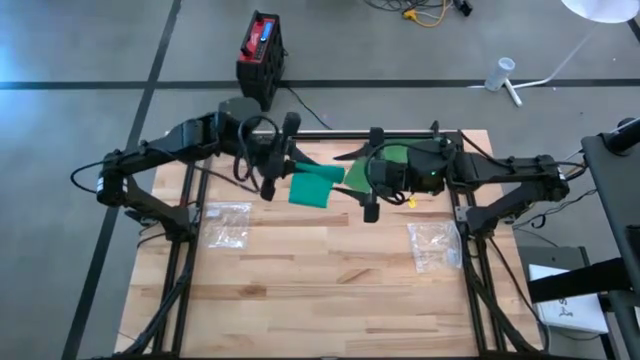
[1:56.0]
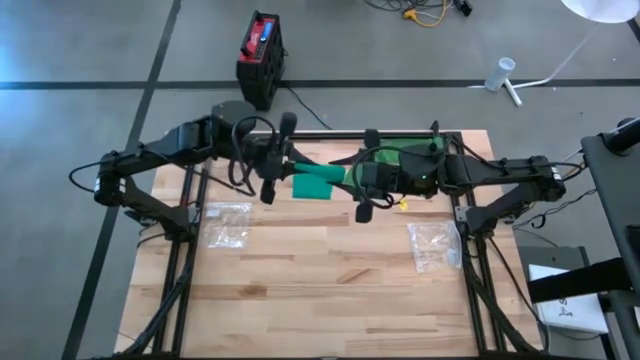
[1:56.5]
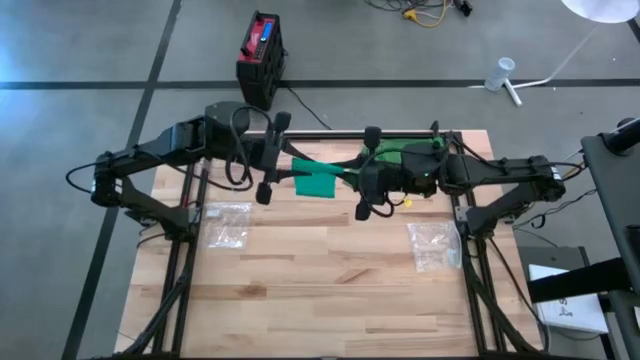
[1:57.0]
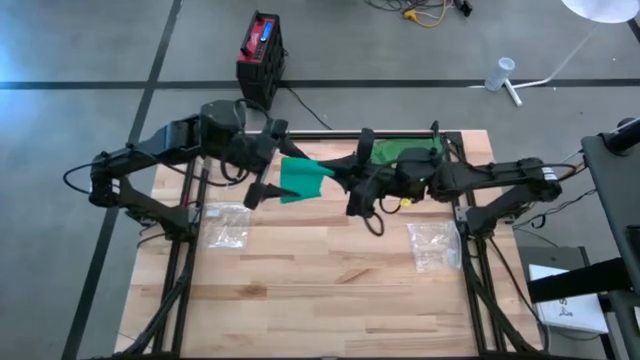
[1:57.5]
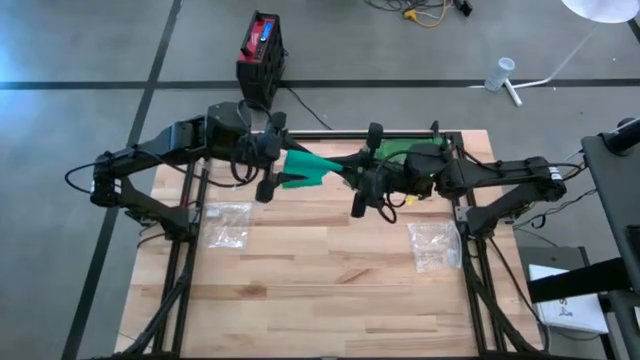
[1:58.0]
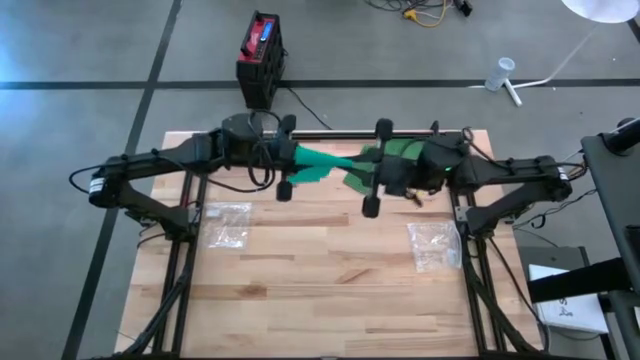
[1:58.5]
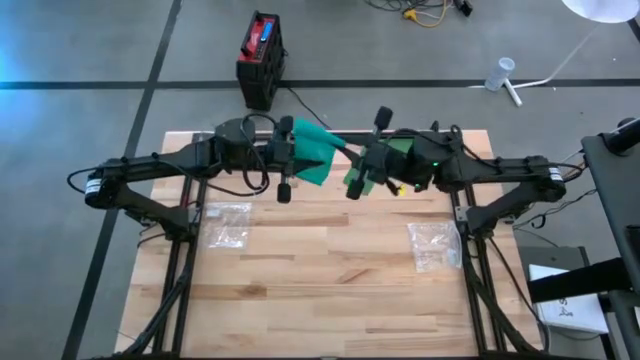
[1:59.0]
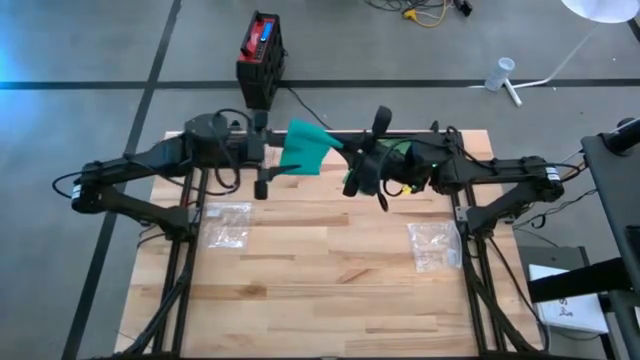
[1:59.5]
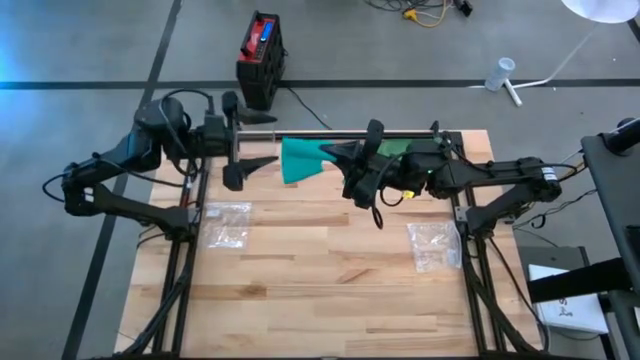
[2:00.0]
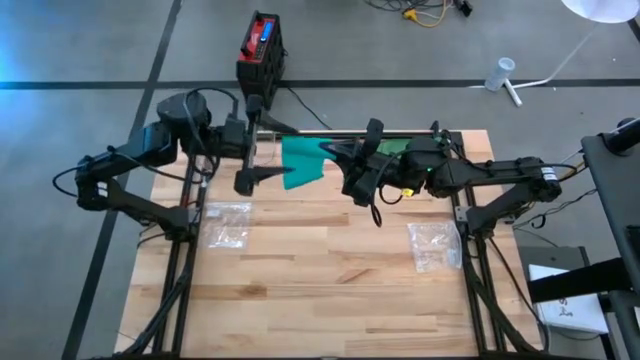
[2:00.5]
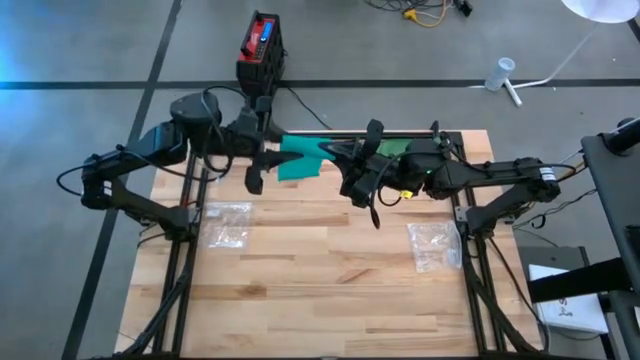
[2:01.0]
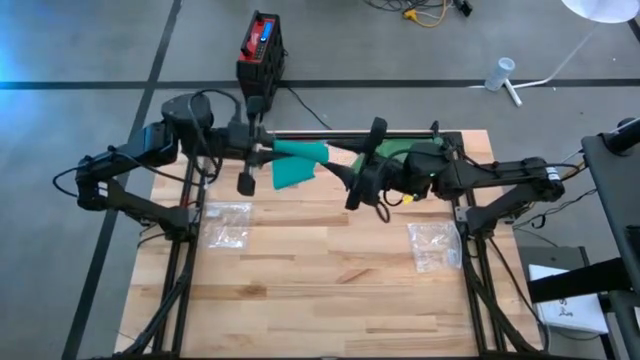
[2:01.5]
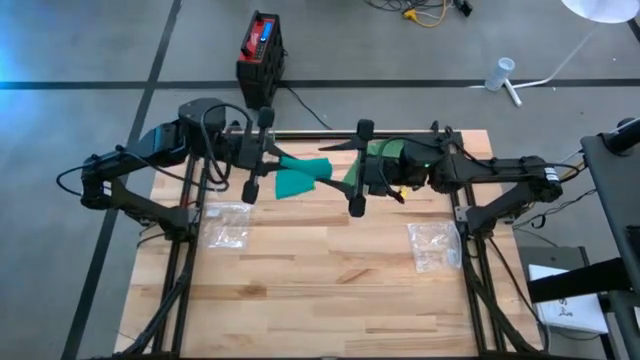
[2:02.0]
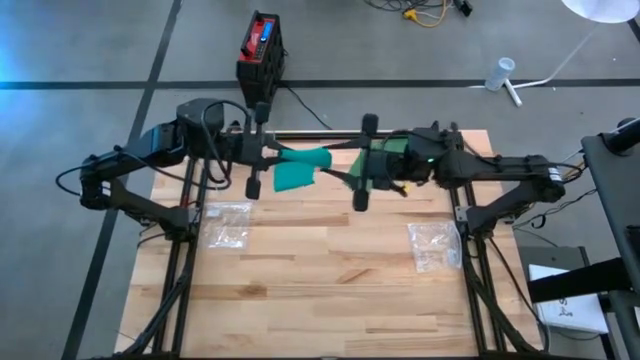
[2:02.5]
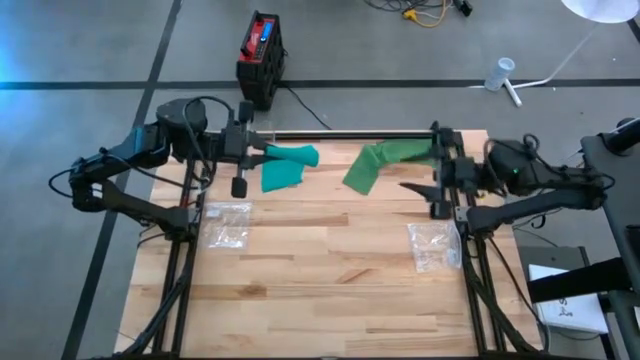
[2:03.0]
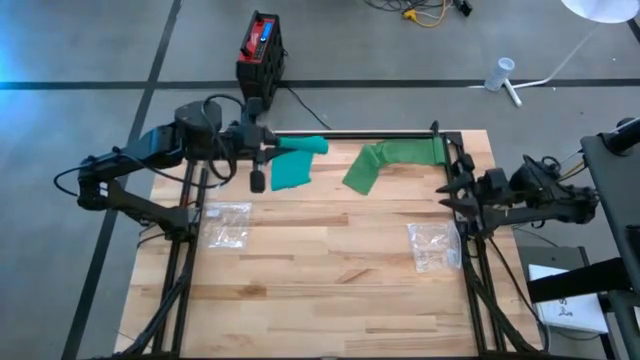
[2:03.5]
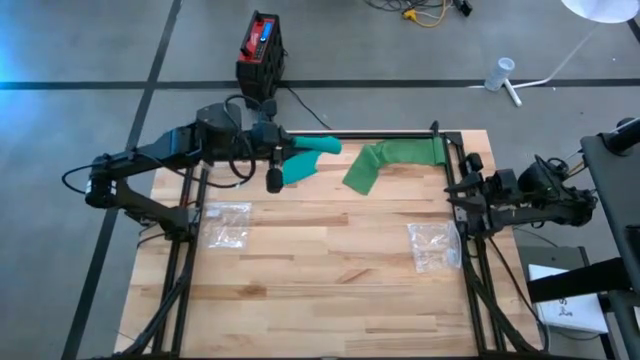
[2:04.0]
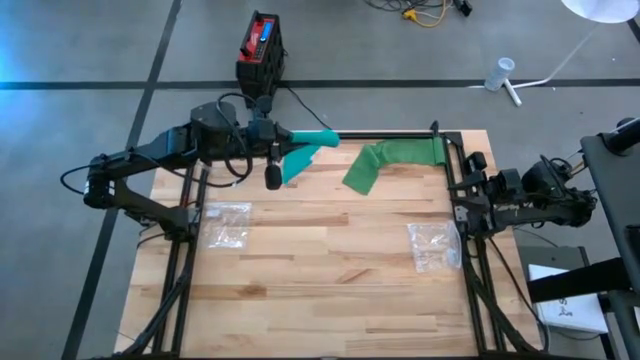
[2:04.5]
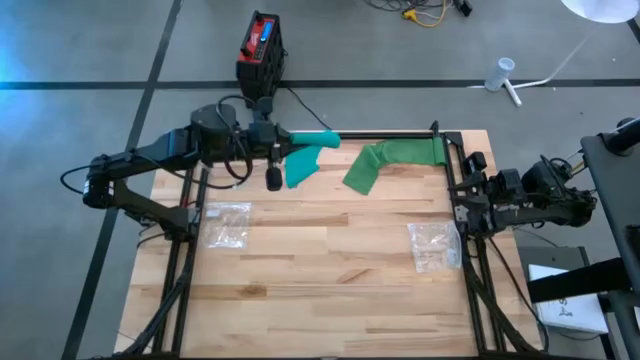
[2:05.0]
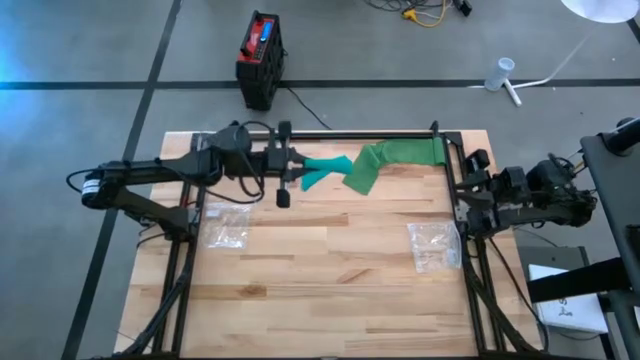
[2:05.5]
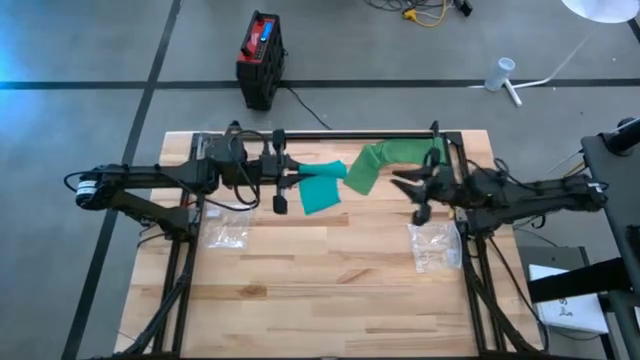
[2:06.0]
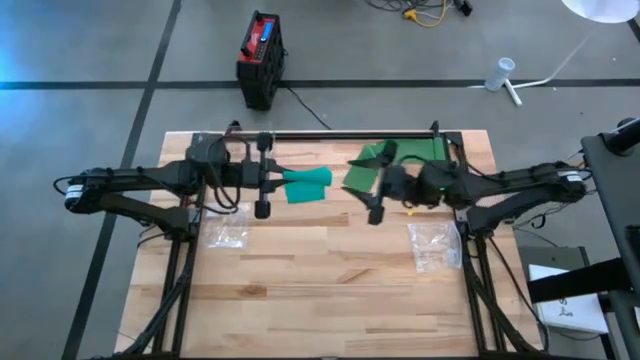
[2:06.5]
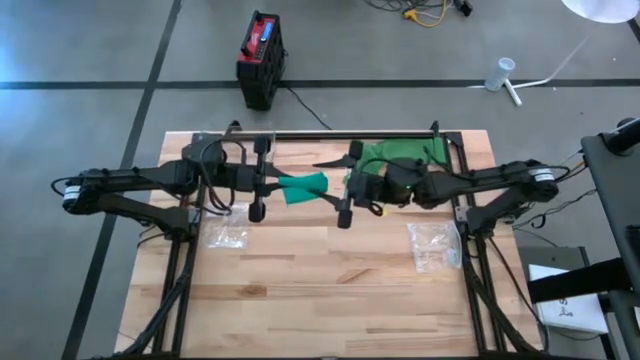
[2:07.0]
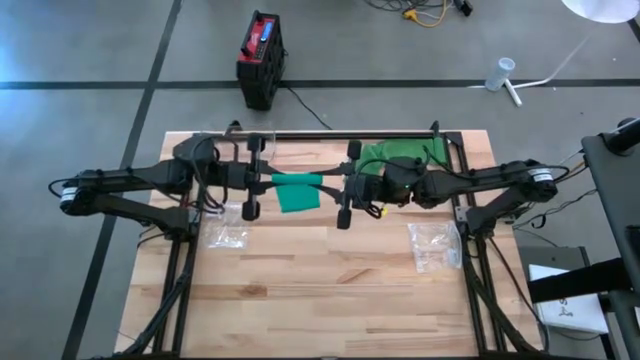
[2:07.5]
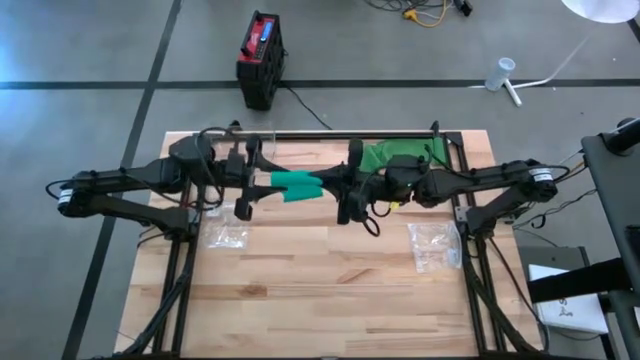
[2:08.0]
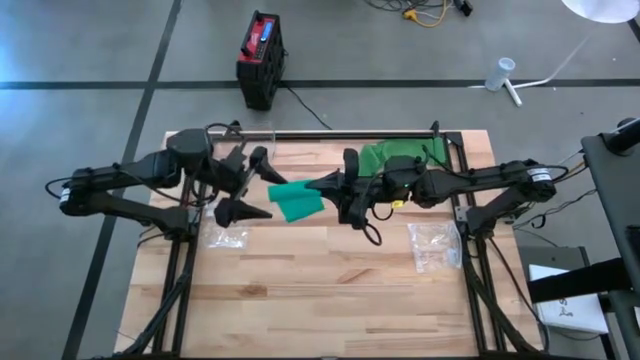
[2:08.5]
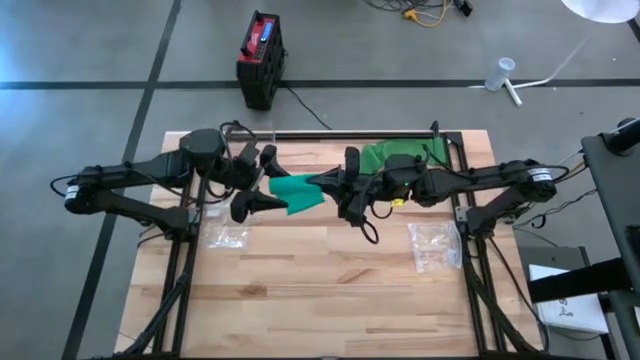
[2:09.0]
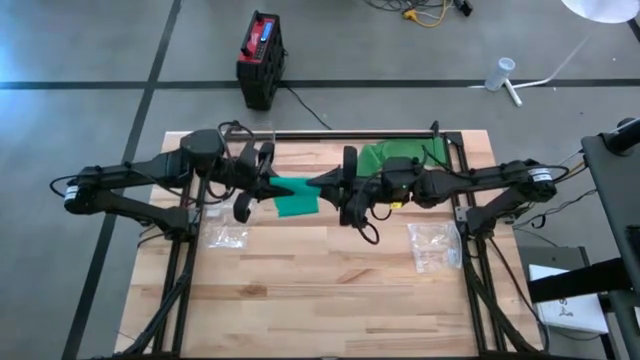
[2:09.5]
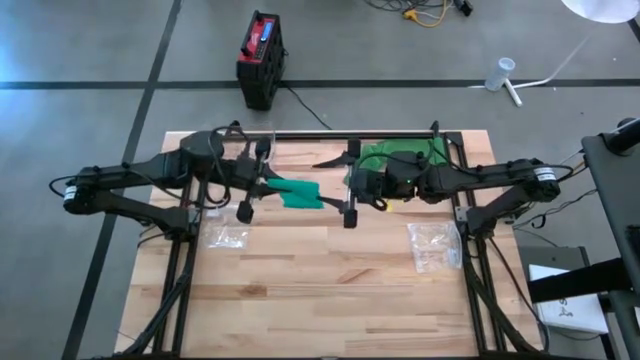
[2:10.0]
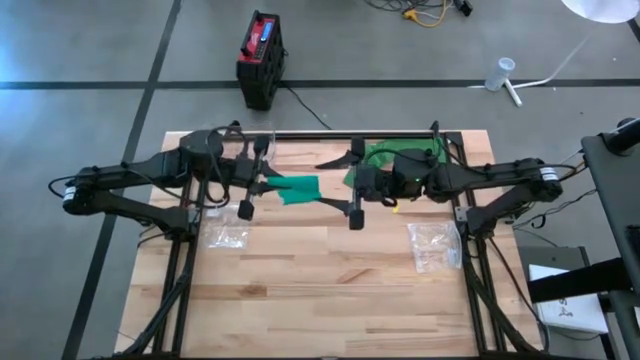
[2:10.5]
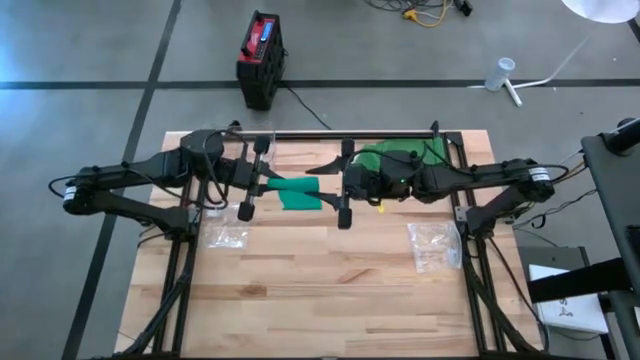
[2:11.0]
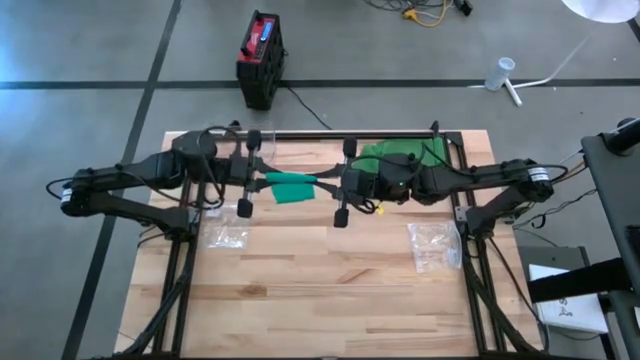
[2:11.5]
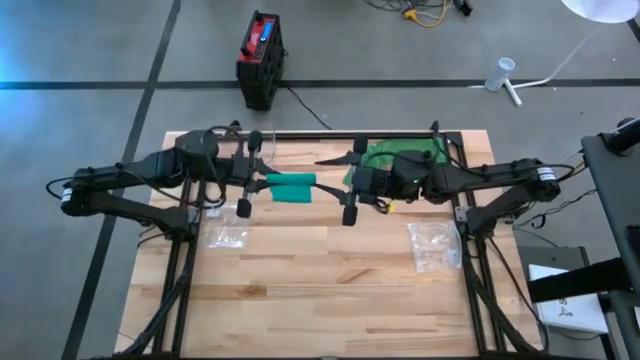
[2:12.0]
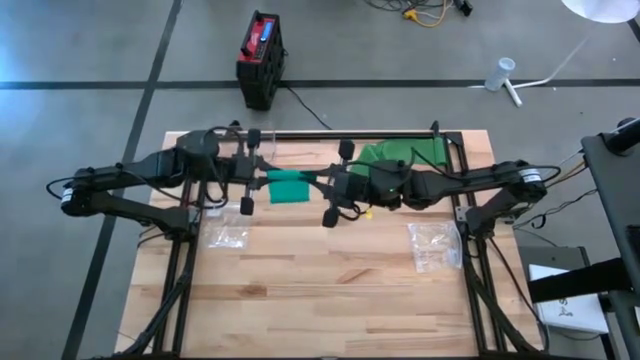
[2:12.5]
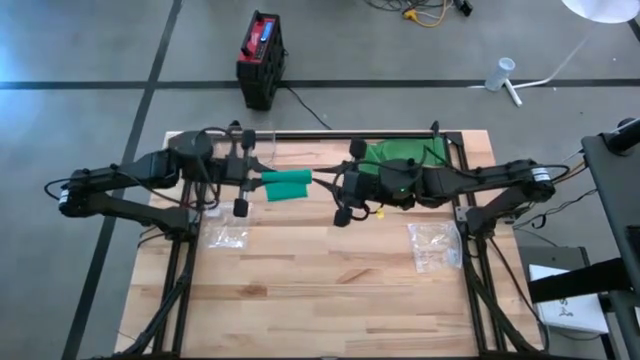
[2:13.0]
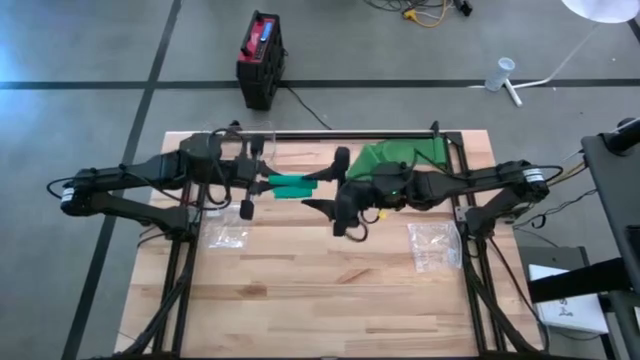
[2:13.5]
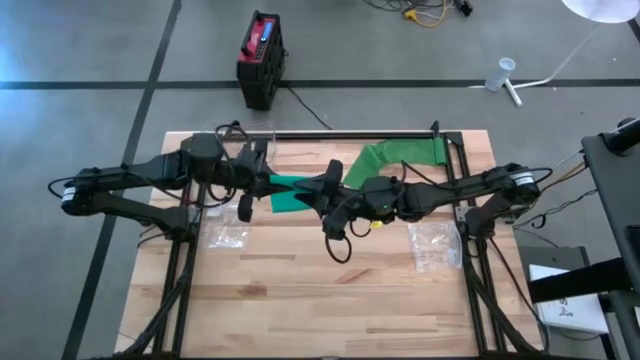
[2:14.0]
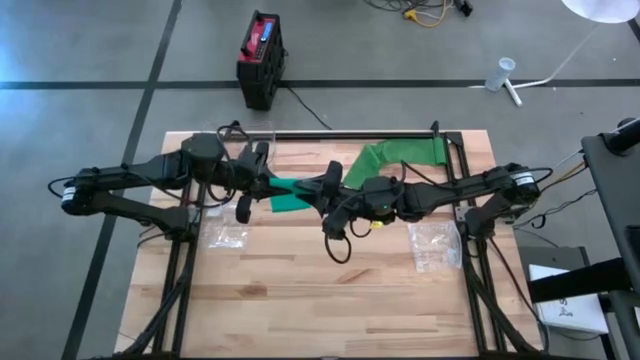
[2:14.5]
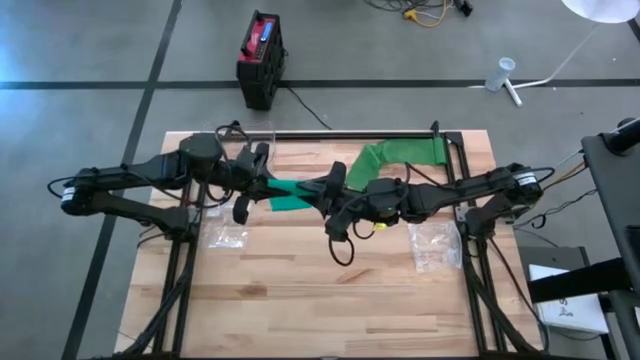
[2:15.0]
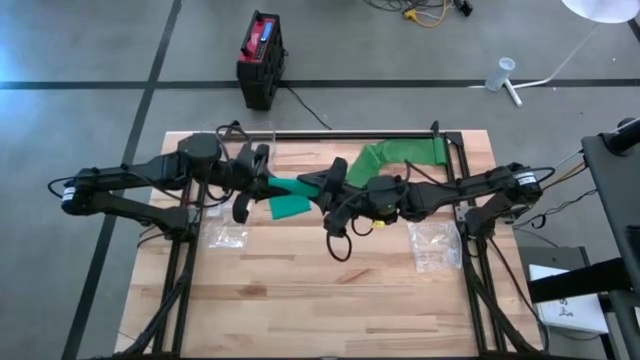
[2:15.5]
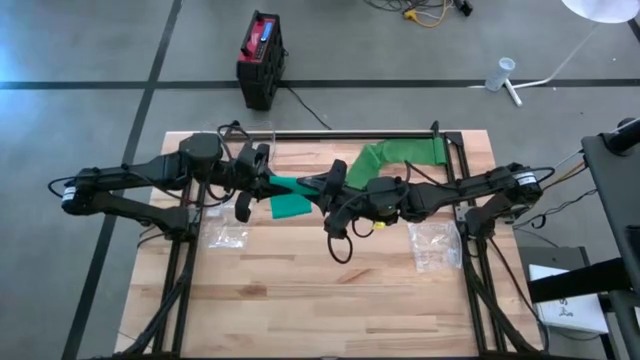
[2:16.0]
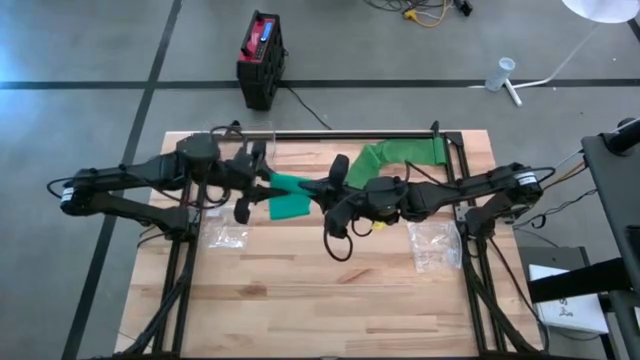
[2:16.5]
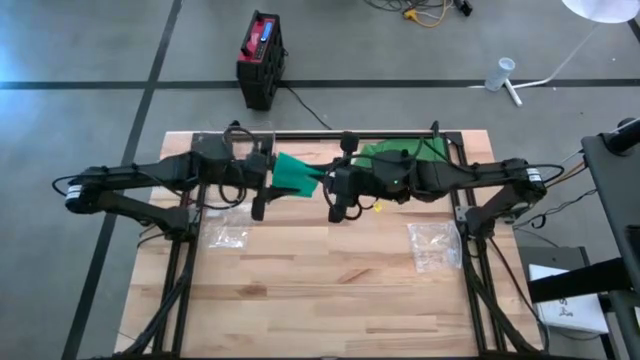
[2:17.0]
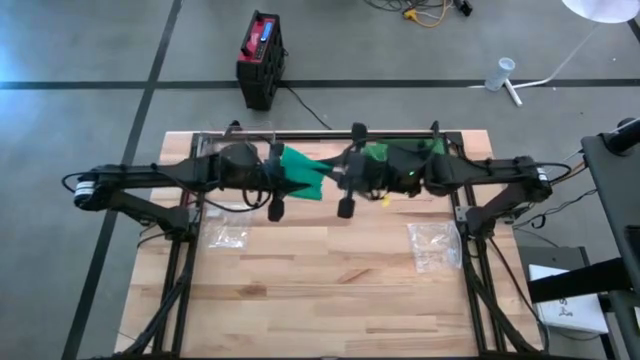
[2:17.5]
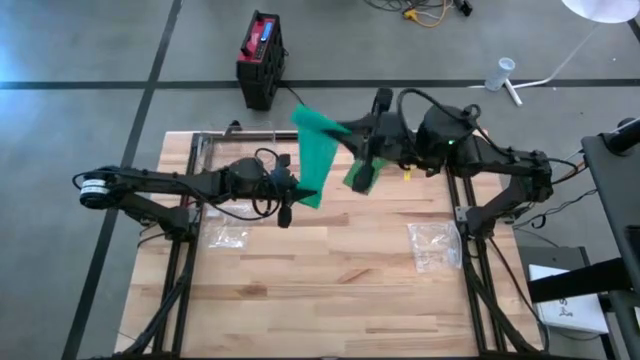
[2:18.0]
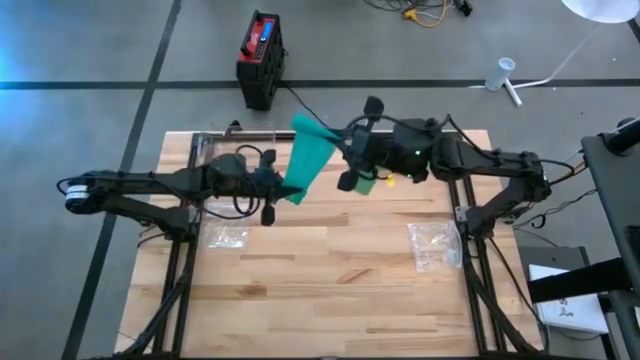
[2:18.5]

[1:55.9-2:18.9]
Task: Roll bandage
Roll the blue bandage
